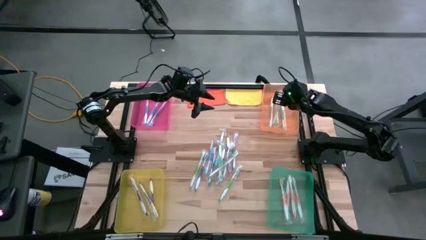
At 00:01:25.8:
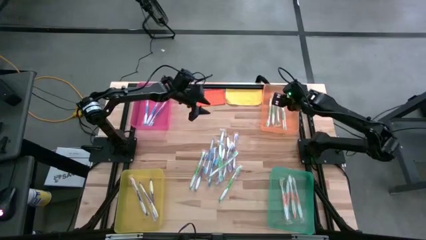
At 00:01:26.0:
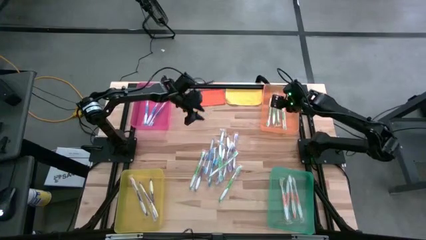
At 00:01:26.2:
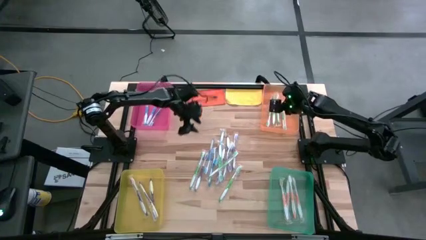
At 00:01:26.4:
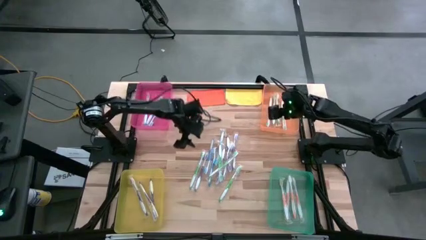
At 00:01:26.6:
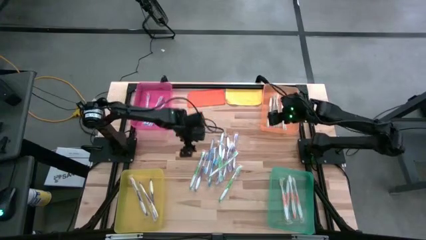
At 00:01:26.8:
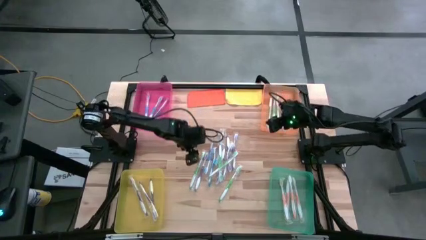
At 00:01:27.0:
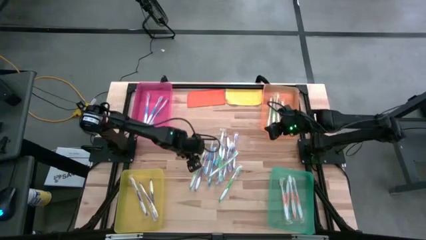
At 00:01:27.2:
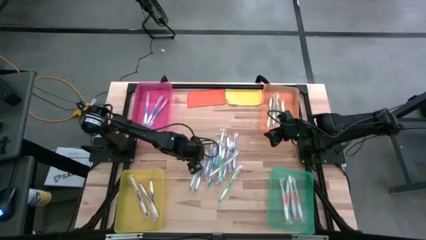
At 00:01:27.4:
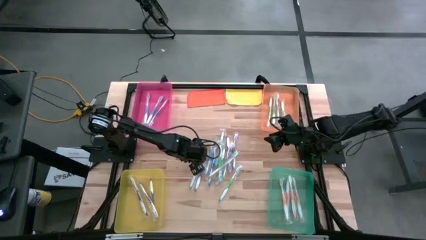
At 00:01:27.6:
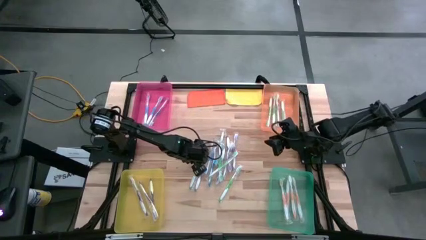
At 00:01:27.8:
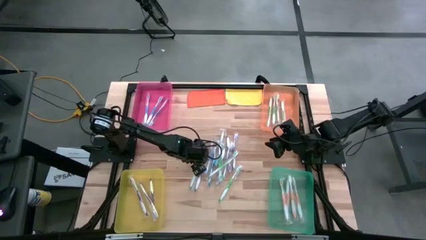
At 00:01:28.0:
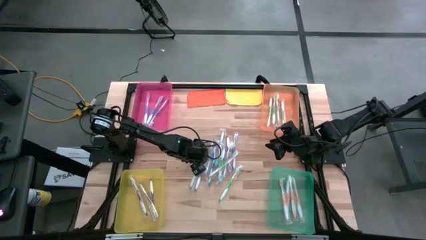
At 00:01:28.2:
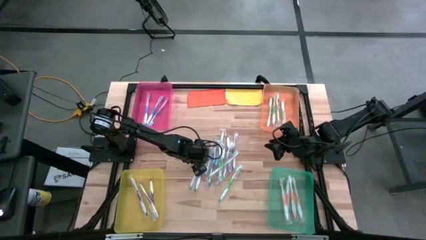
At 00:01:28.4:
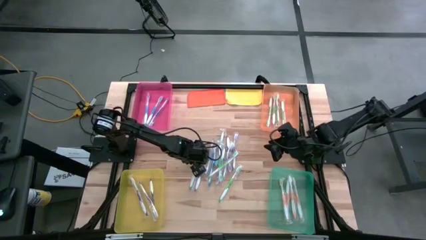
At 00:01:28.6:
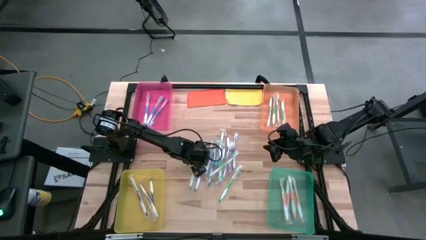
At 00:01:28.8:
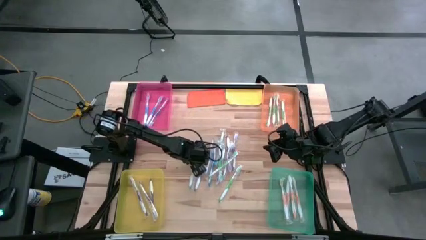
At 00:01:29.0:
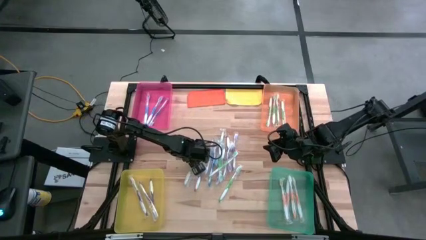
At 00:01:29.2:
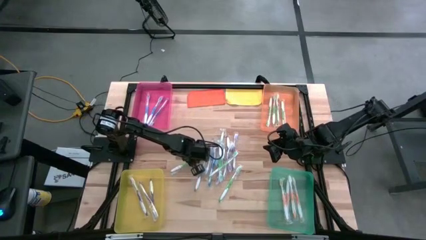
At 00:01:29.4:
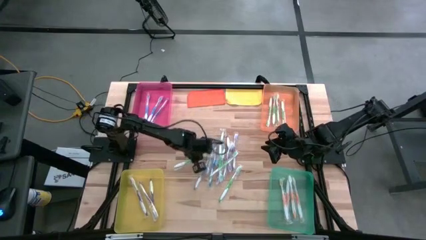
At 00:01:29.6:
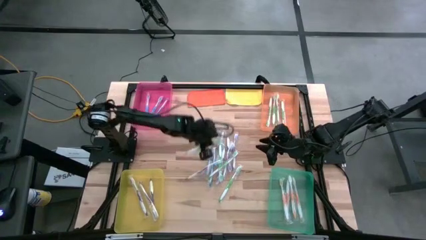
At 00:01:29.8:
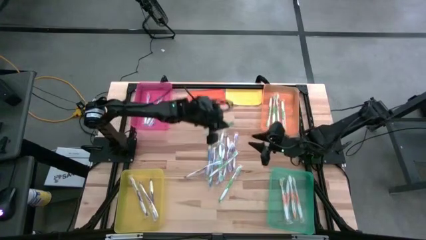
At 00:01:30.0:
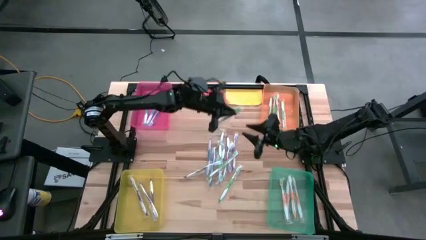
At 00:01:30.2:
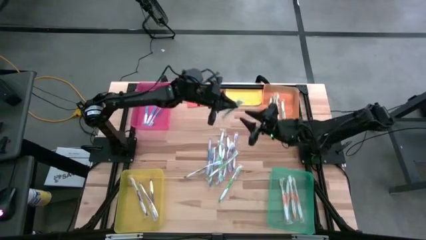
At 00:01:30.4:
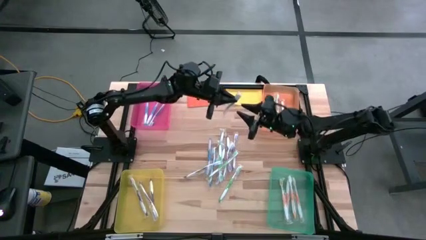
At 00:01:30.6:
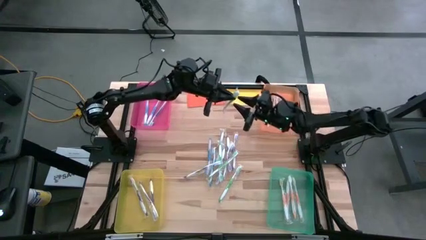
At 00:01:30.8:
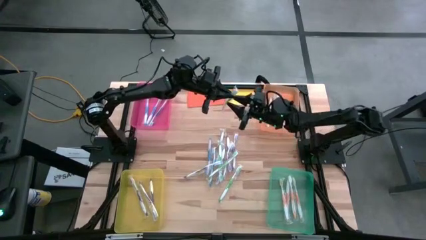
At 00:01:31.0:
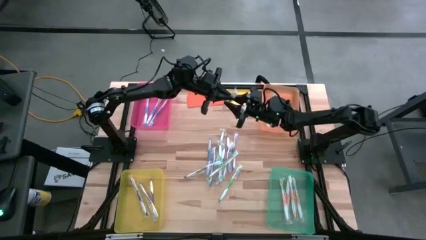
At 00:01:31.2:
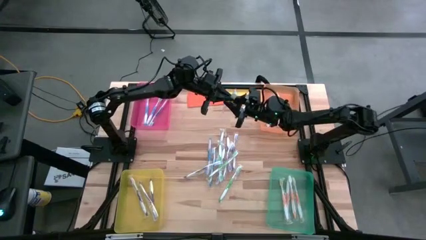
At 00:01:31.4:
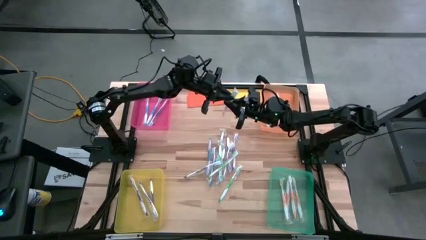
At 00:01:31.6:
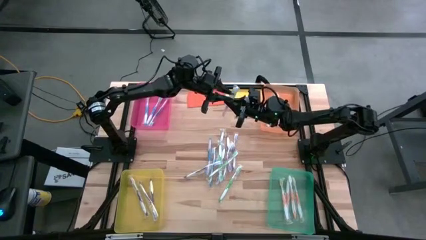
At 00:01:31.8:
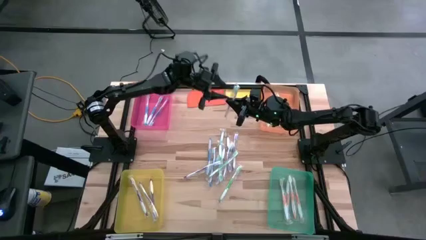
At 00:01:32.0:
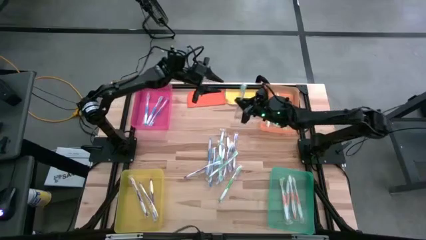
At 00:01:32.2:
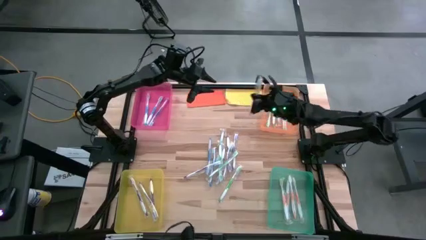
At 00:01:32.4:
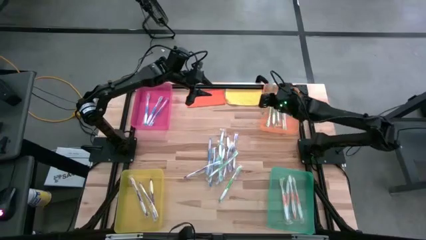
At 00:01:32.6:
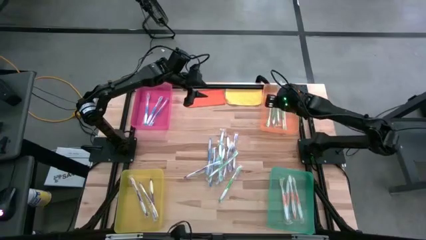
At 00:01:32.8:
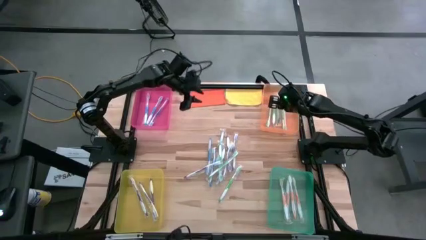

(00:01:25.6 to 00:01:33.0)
Task: Pick & Place Toothbrushes
Put the green toothbrush into the orange bin

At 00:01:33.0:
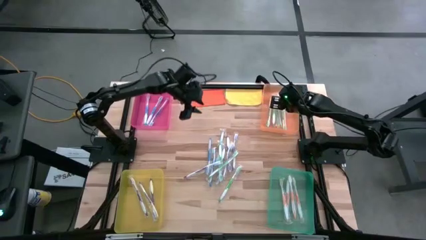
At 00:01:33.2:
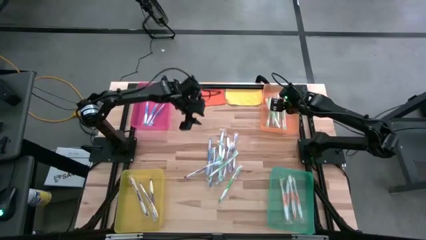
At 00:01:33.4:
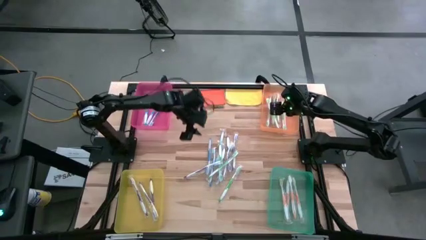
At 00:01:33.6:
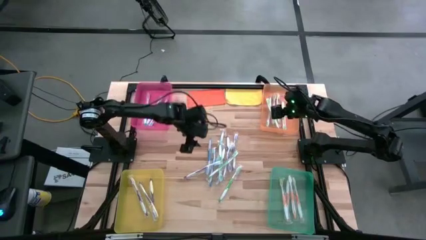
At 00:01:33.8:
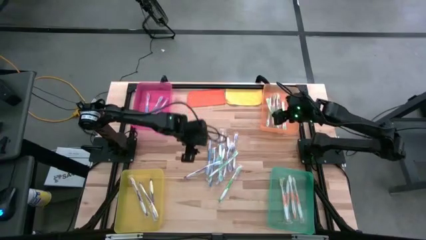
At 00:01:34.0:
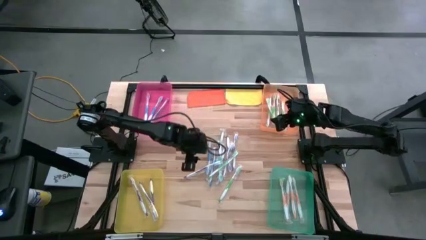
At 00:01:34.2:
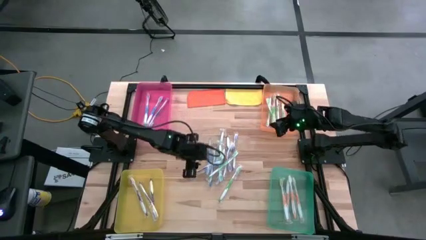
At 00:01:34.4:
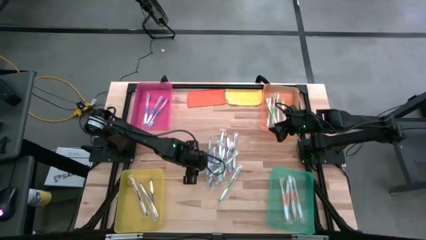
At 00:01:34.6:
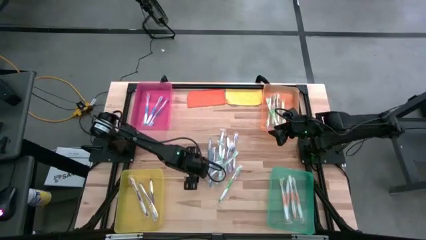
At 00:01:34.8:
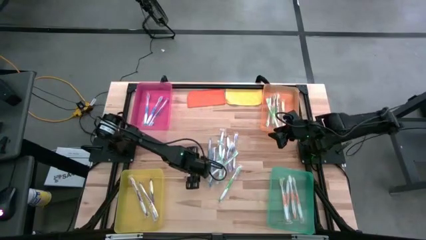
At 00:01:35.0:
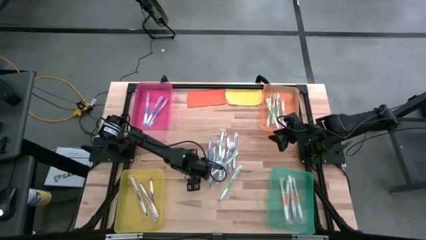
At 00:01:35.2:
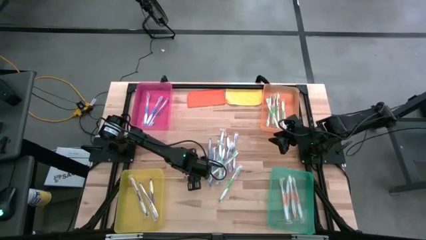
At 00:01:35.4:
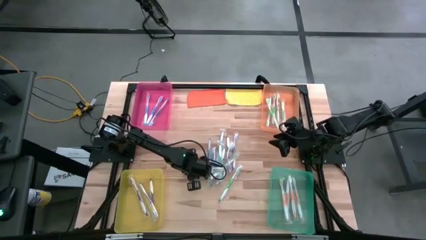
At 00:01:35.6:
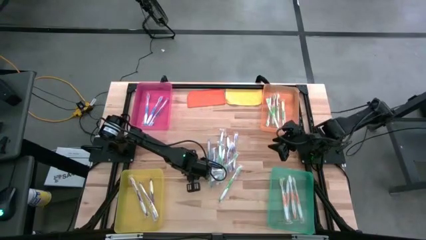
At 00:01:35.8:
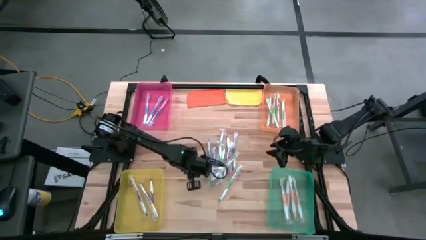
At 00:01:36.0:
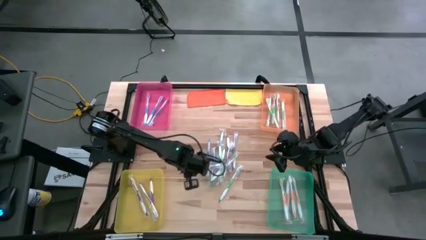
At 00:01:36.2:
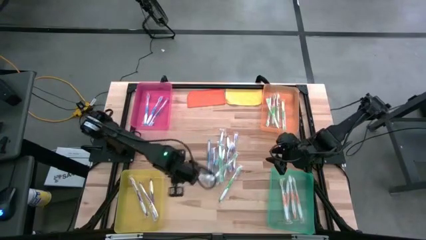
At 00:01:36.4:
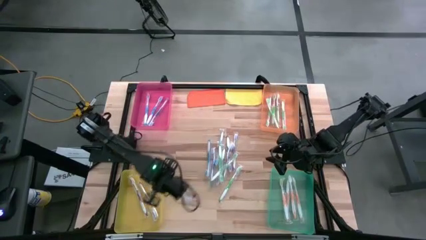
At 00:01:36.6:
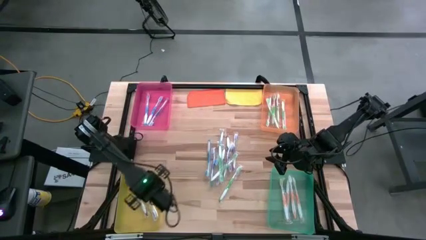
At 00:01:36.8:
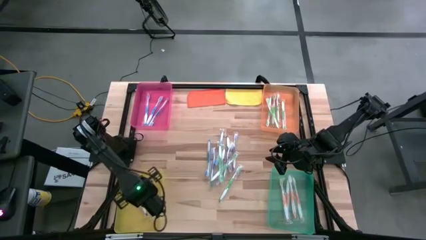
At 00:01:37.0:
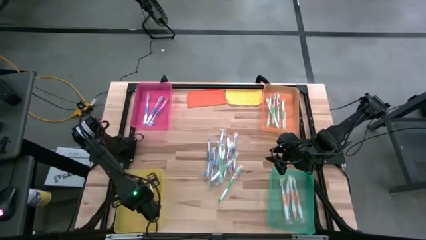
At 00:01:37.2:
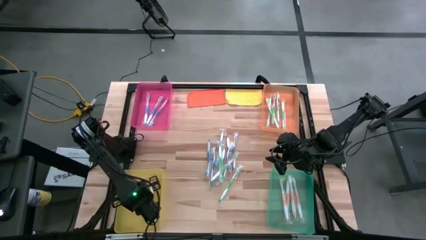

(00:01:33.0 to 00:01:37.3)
Put the purple toothbrush into the yellow bin

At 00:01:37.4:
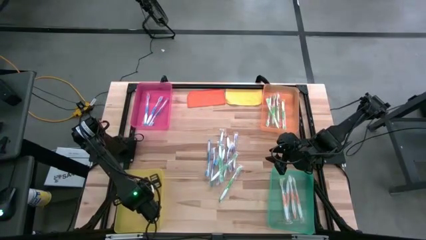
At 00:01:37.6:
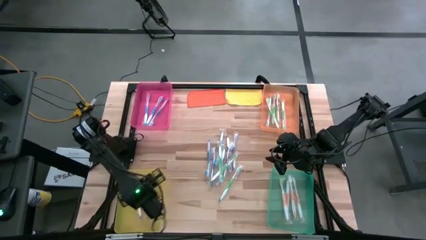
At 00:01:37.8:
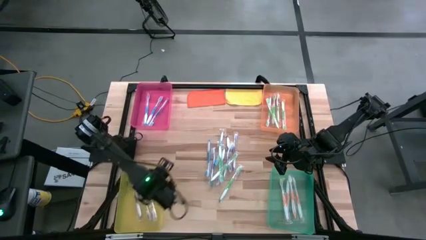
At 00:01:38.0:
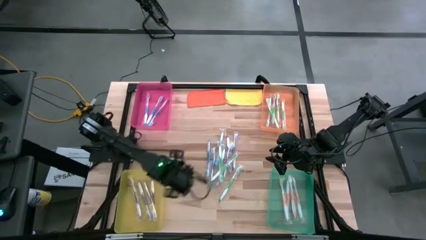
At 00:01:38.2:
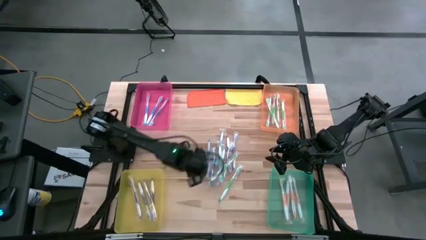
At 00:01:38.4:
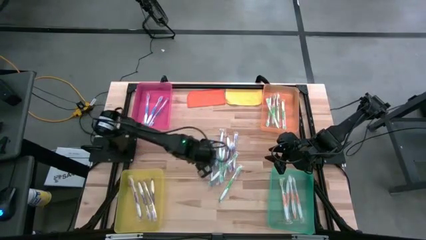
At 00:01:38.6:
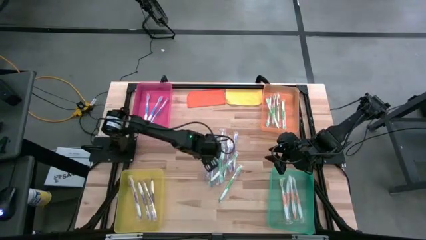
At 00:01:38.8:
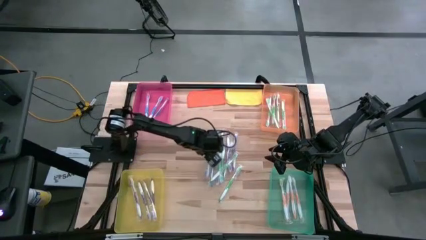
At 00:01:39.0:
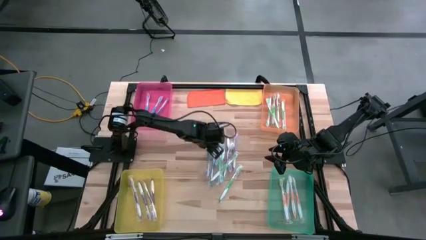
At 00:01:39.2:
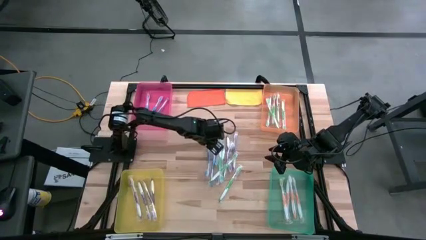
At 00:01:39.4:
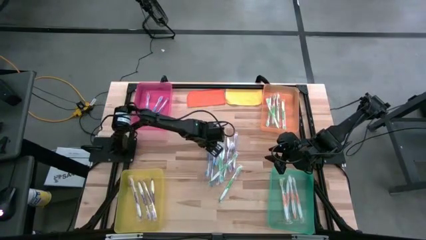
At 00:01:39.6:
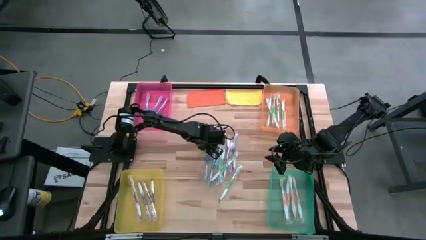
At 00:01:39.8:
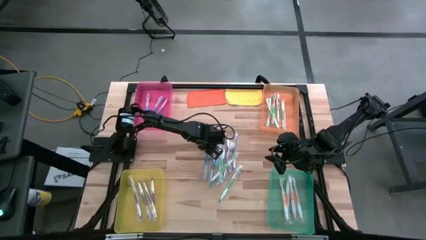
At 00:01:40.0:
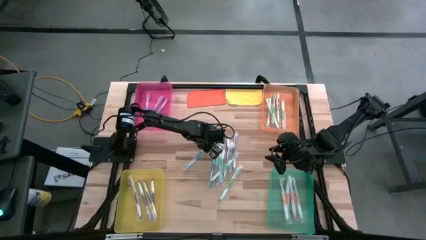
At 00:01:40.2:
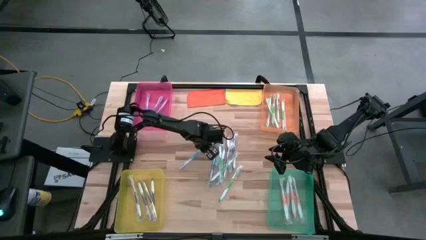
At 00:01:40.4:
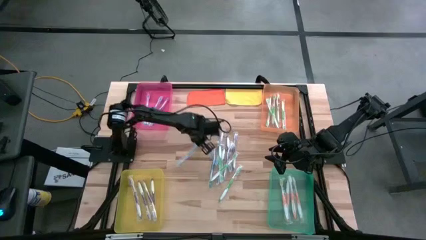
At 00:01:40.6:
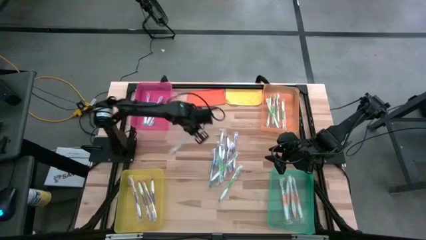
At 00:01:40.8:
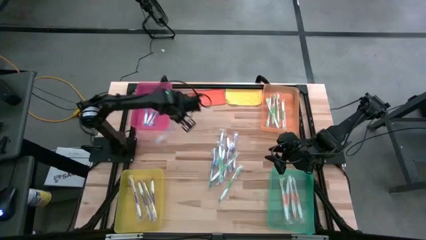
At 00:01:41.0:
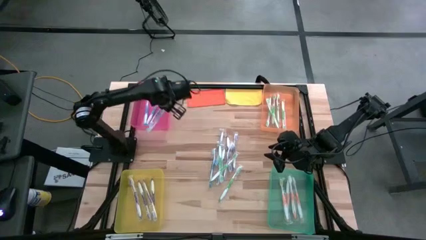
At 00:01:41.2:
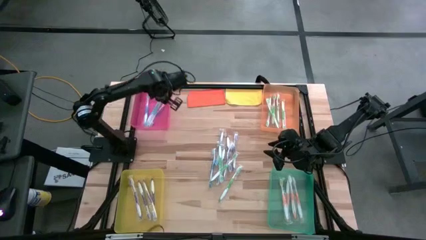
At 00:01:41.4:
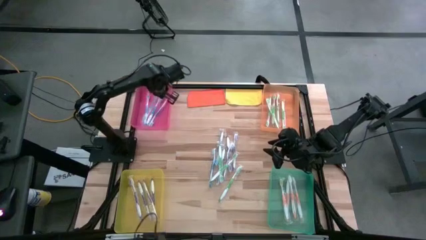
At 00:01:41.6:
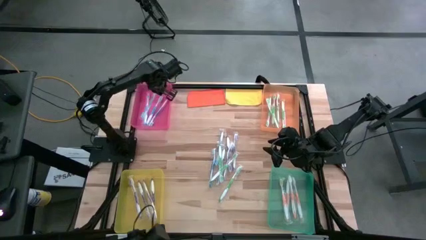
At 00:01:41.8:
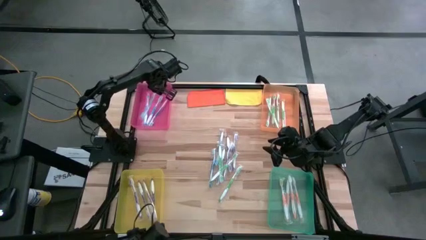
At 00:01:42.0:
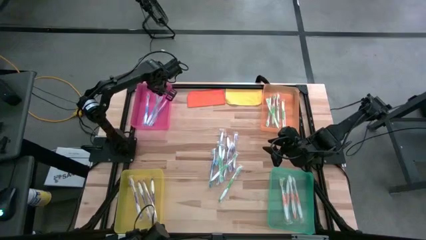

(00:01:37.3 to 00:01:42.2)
Put the blue toothbrush into the red bin
